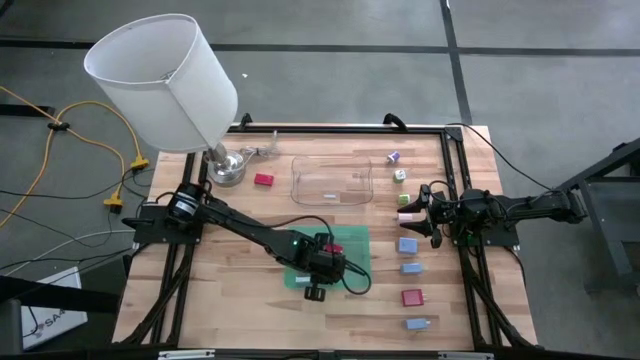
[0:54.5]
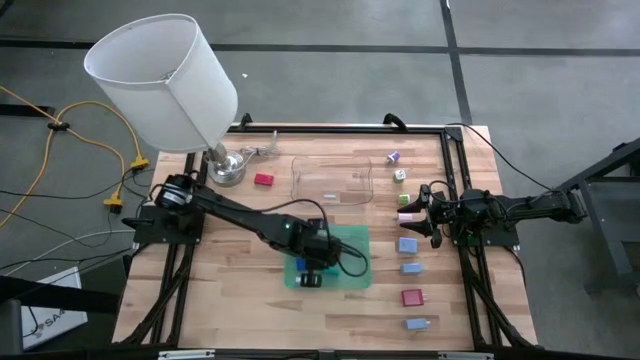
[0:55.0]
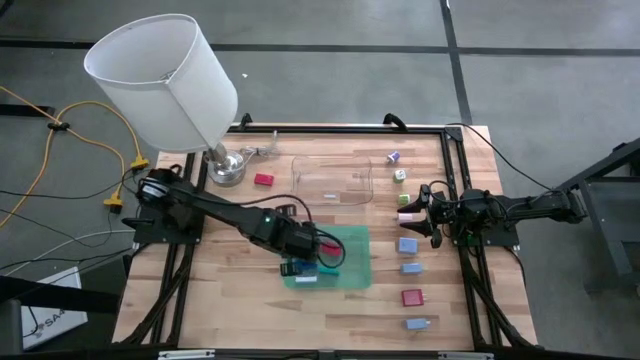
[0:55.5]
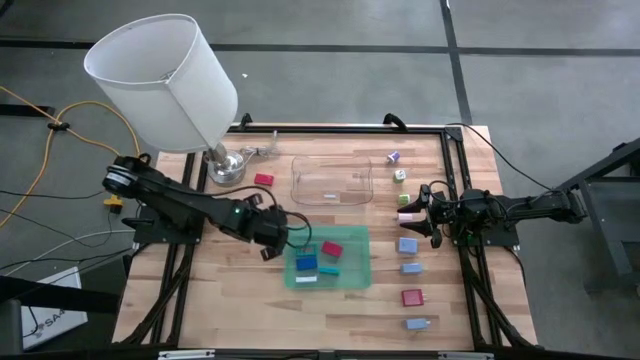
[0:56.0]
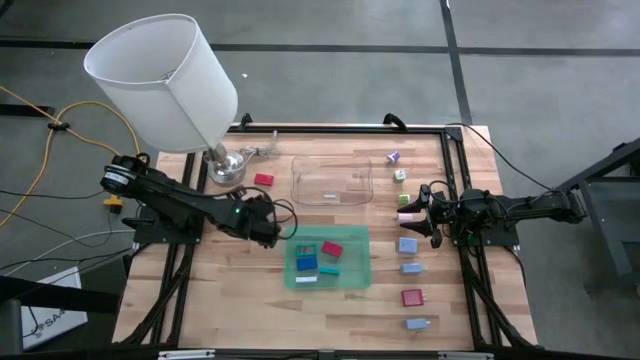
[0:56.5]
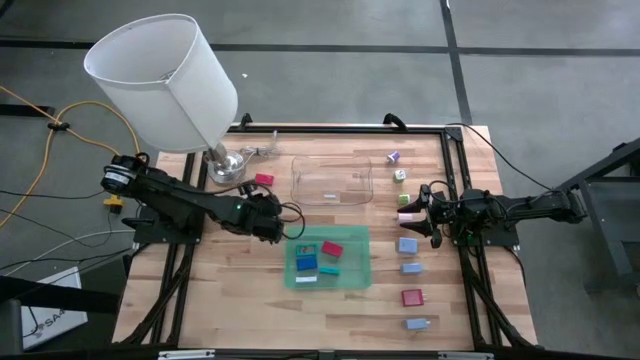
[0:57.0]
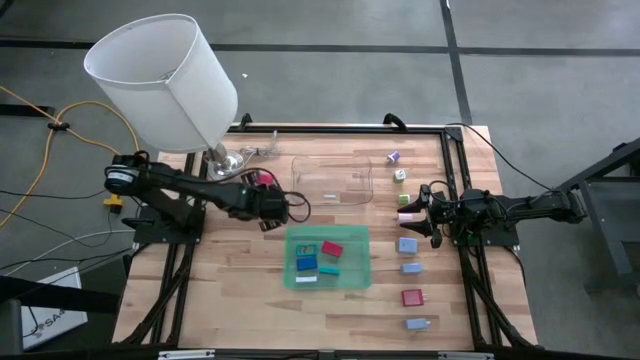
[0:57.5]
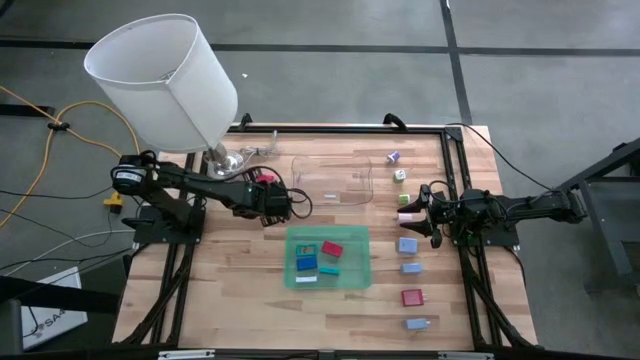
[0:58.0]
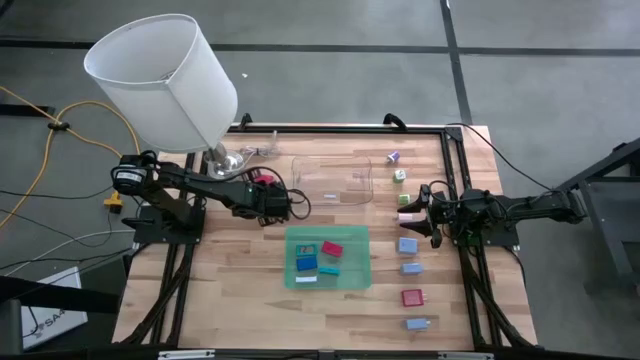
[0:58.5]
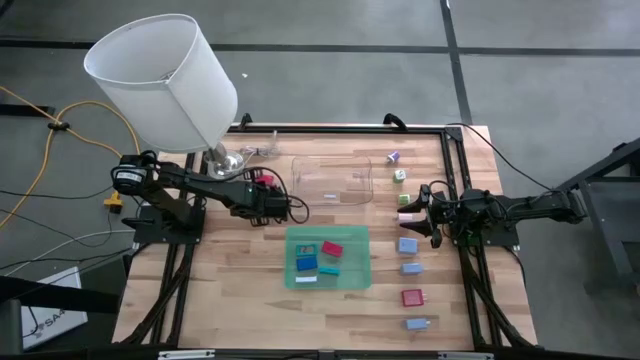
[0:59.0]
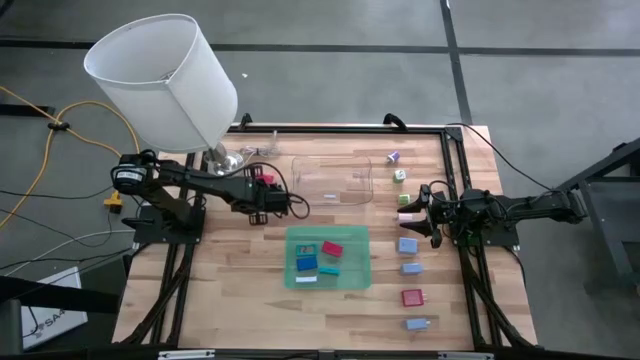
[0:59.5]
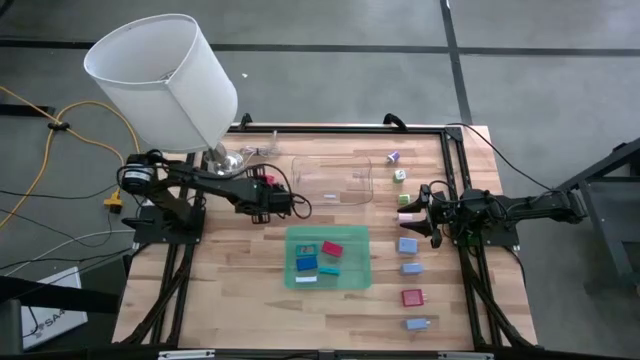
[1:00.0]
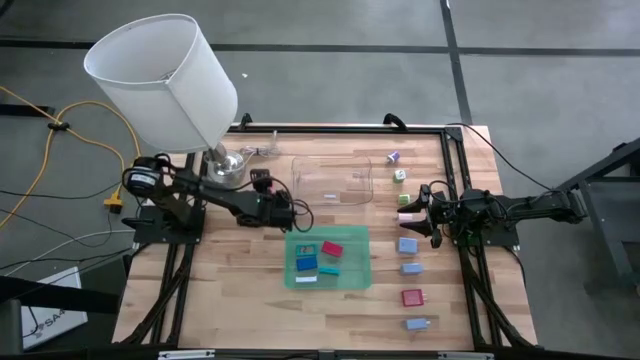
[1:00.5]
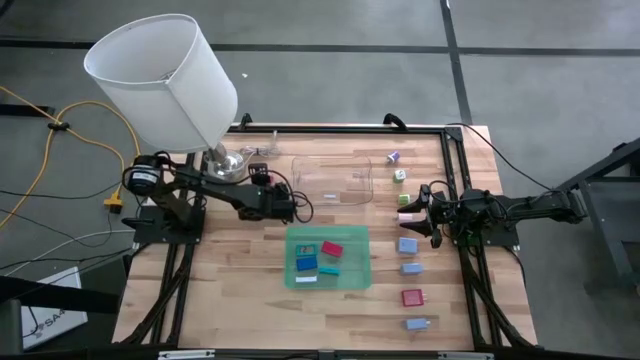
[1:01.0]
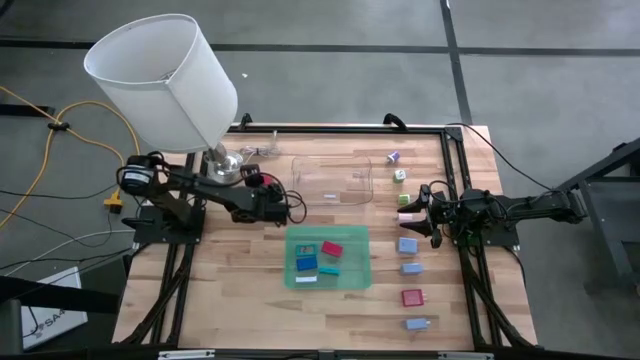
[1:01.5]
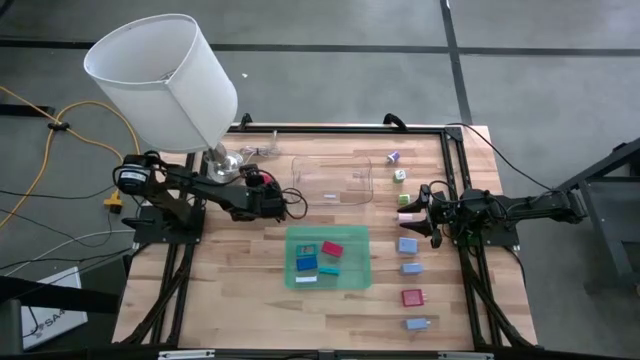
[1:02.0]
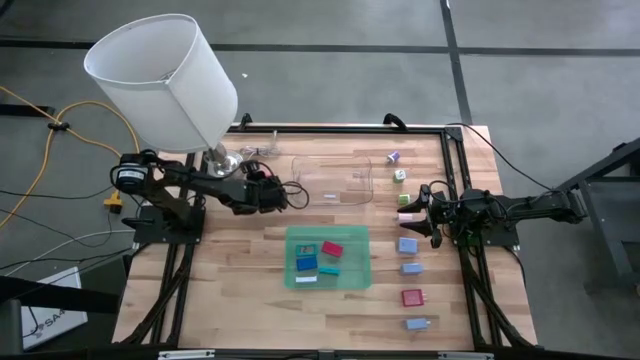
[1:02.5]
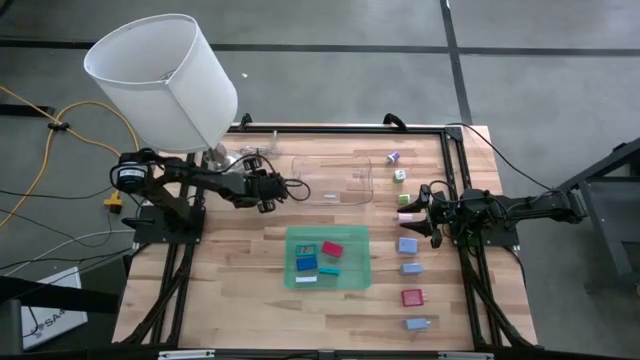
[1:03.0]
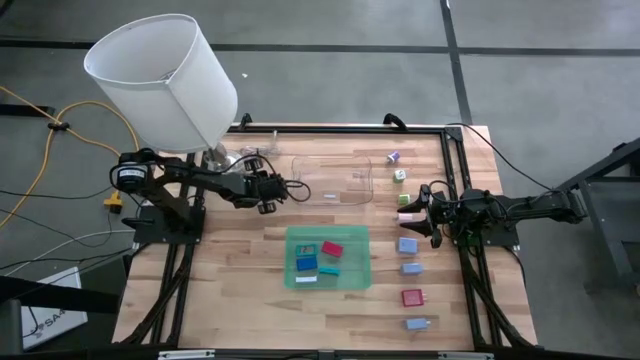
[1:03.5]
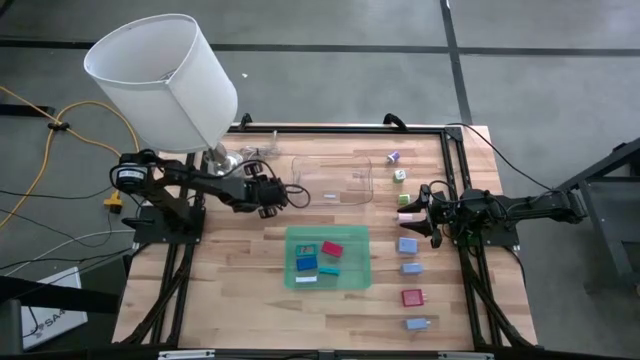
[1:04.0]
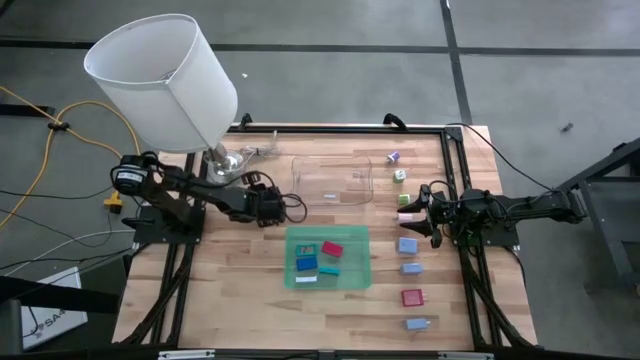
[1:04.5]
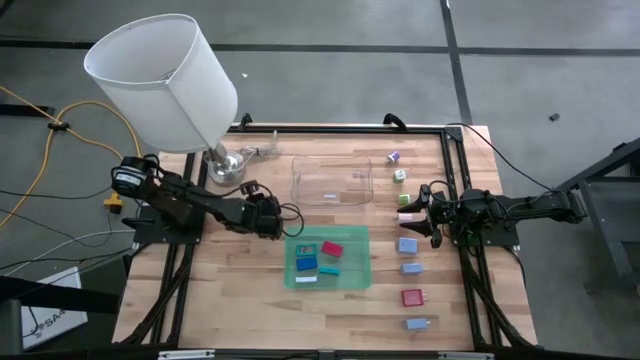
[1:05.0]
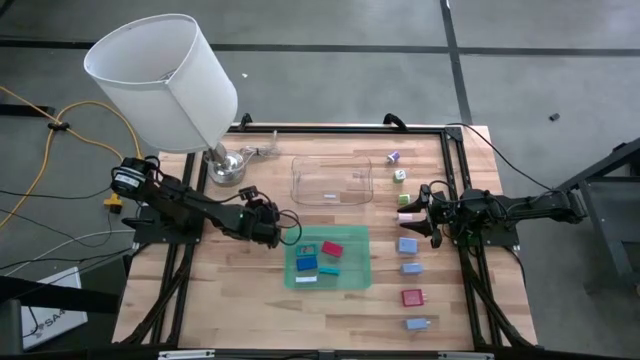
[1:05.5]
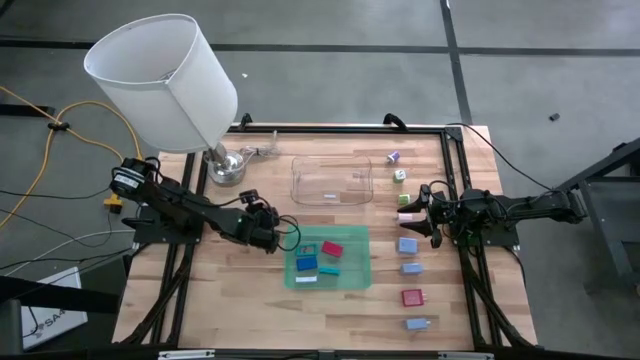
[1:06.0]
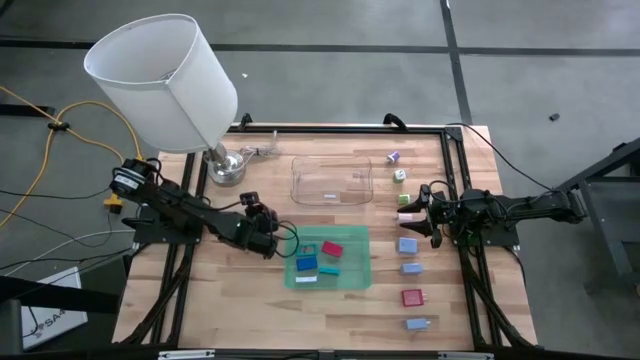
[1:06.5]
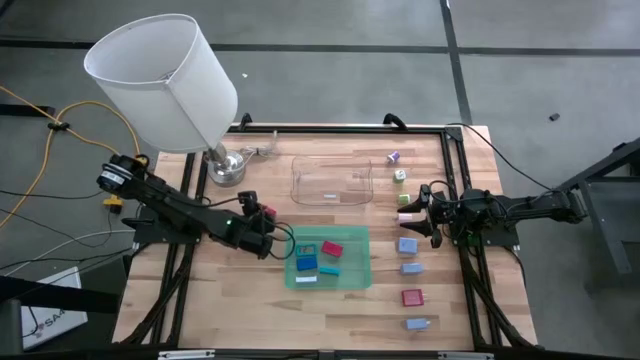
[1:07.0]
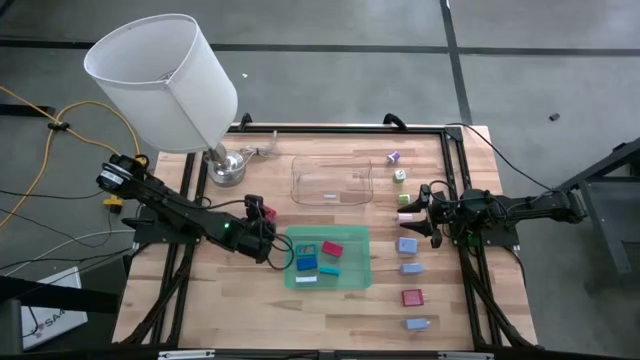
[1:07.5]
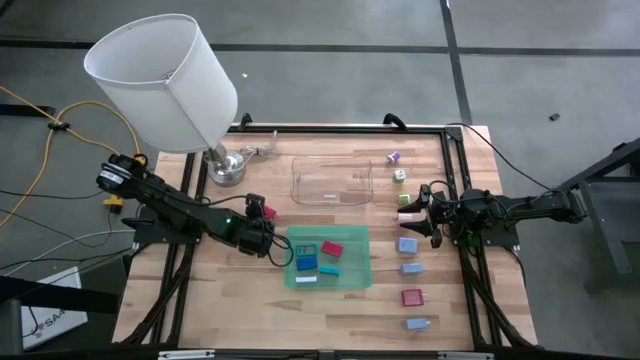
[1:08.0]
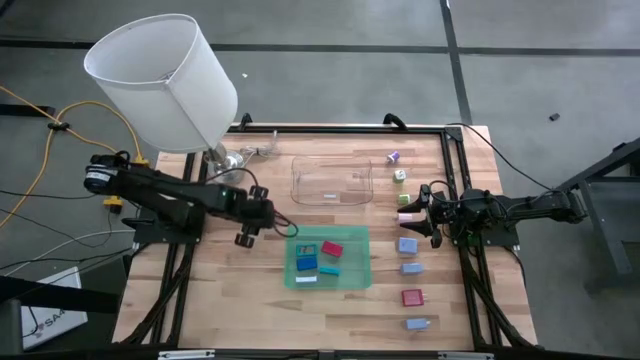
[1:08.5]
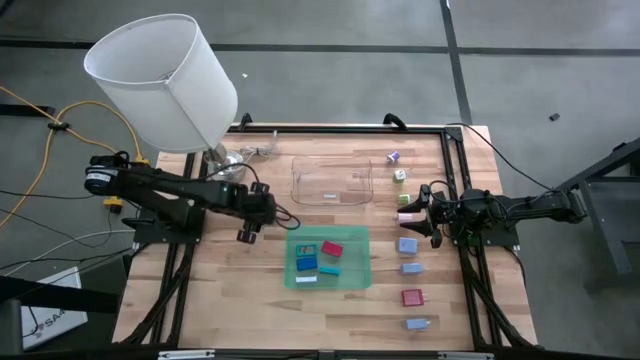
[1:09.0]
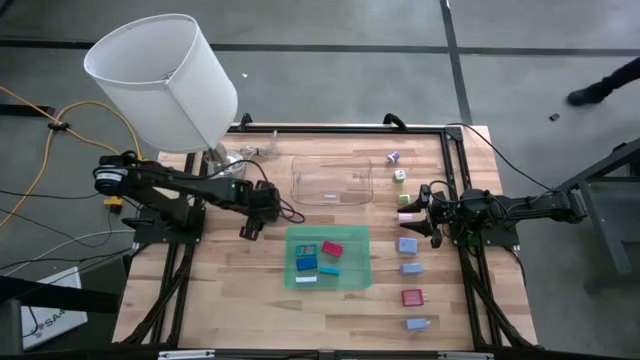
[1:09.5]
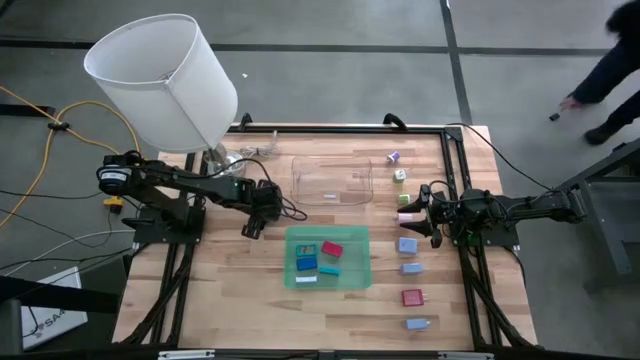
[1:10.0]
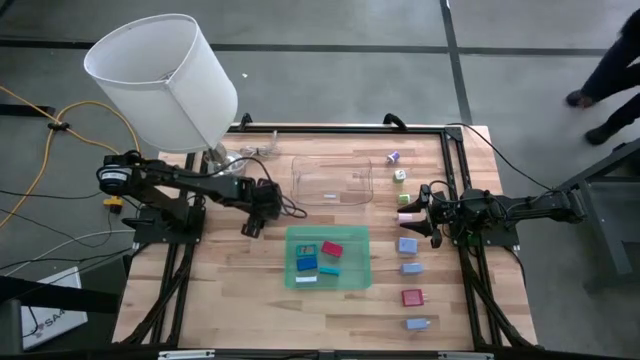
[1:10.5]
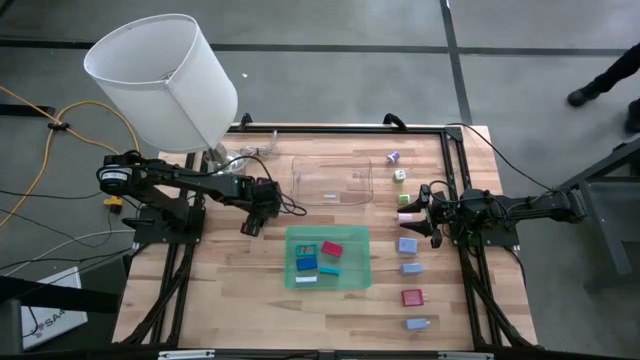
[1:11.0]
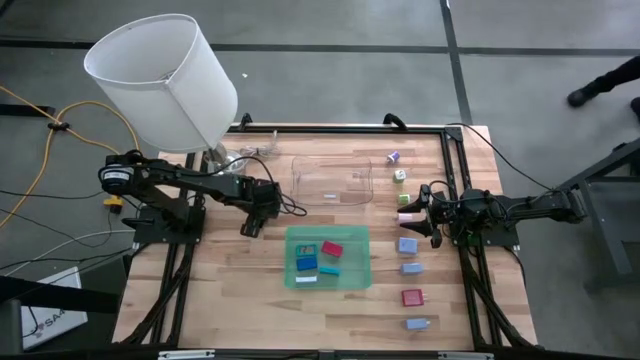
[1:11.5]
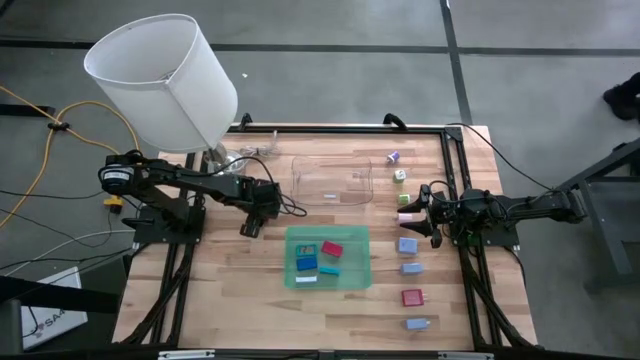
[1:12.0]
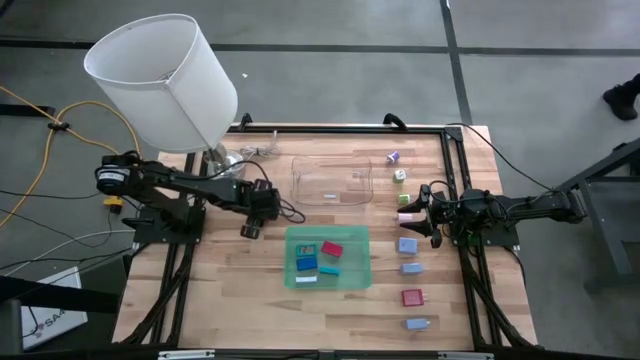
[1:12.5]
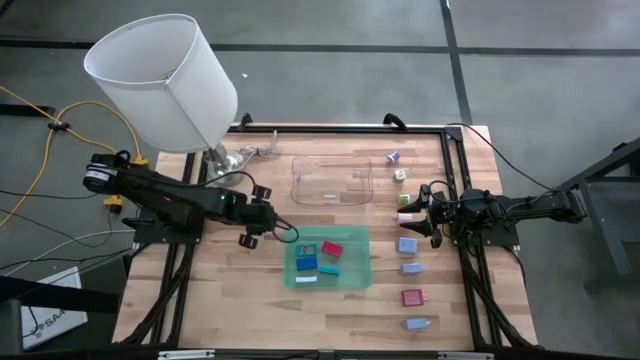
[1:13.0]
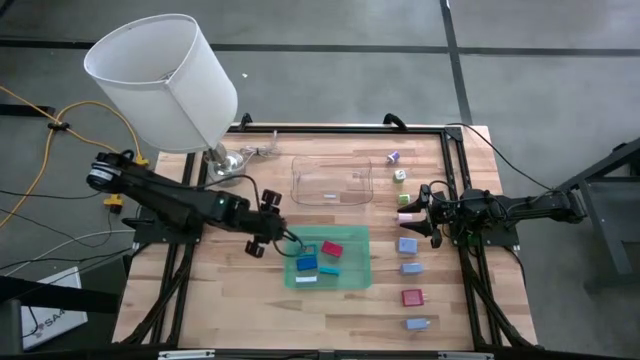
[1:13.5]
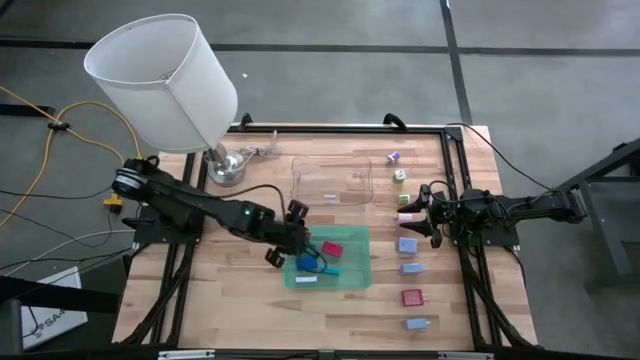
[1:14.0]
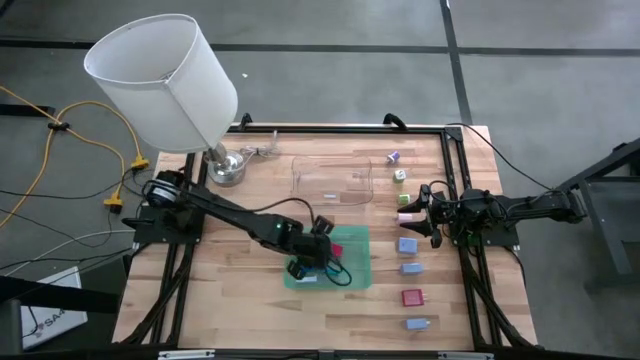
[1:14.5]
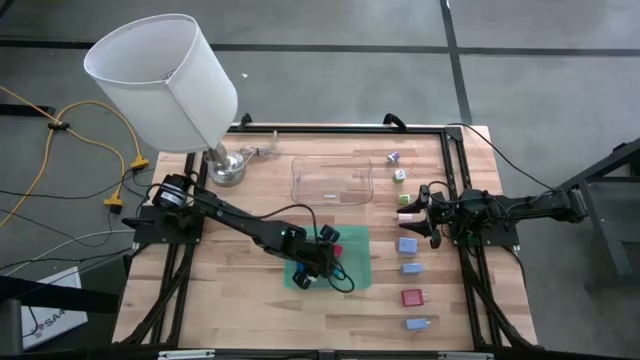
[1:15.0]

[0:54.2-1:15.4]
Task: Pick & Place Office items
Put the red digital clock into the blue bin
